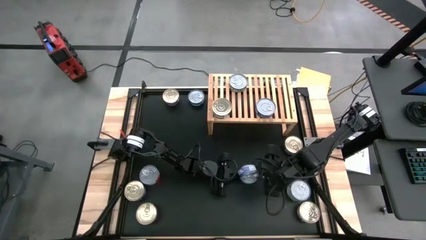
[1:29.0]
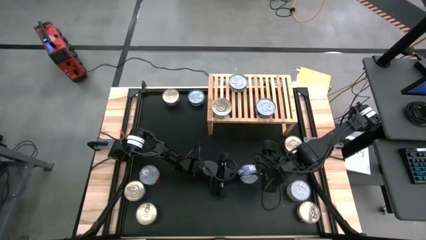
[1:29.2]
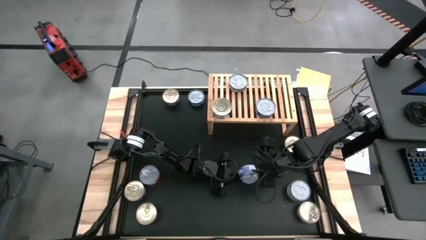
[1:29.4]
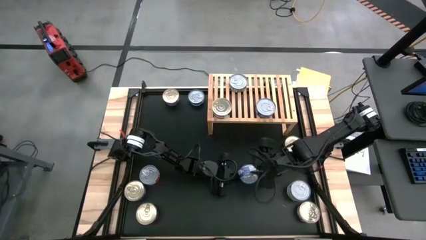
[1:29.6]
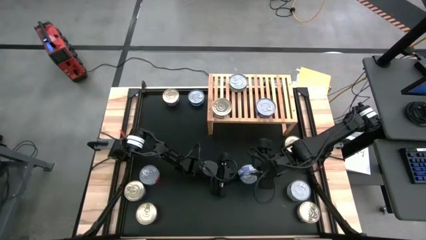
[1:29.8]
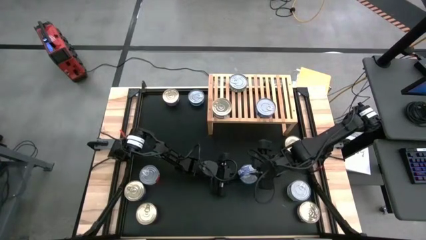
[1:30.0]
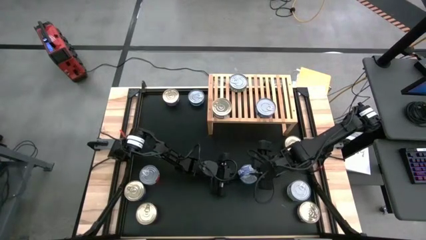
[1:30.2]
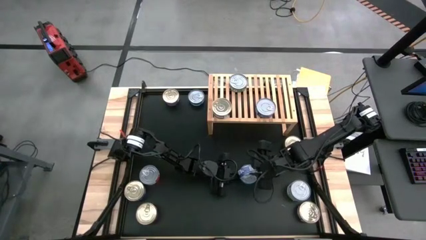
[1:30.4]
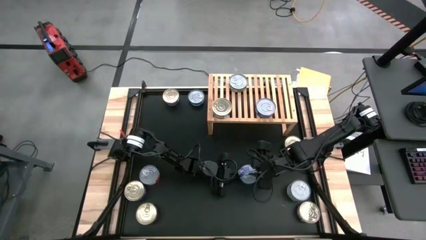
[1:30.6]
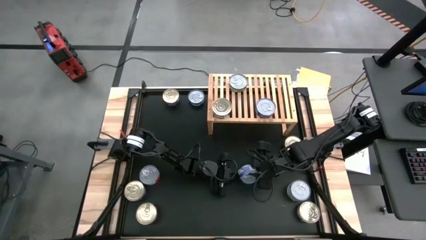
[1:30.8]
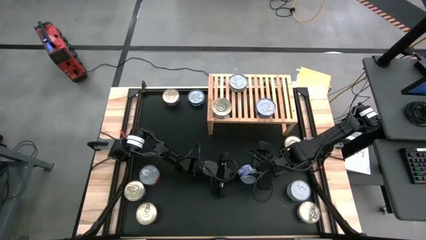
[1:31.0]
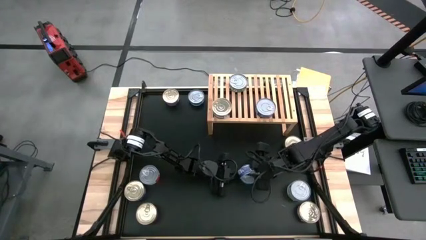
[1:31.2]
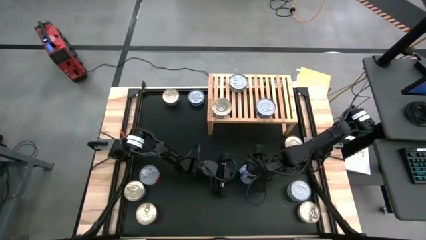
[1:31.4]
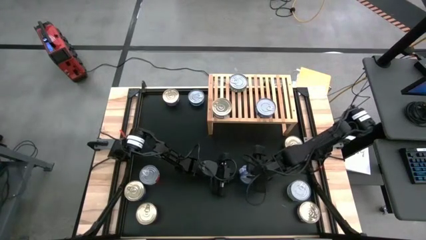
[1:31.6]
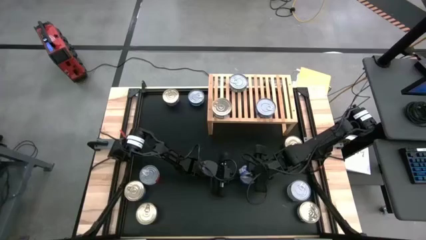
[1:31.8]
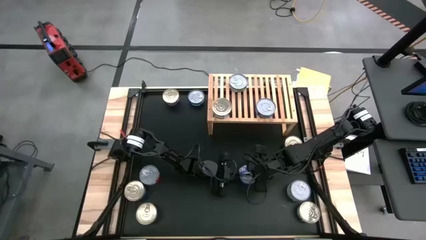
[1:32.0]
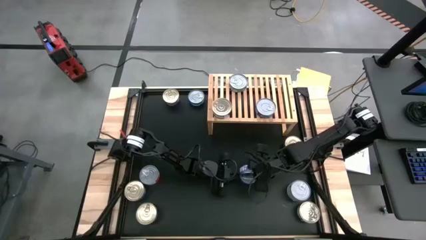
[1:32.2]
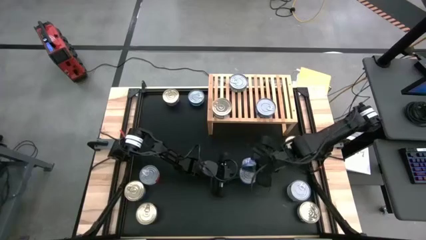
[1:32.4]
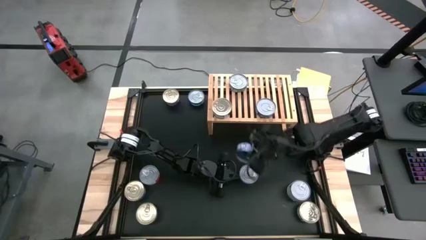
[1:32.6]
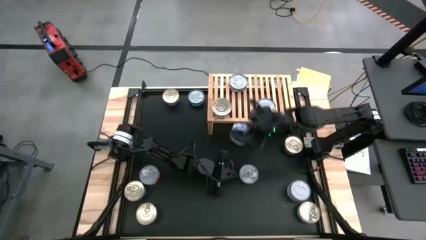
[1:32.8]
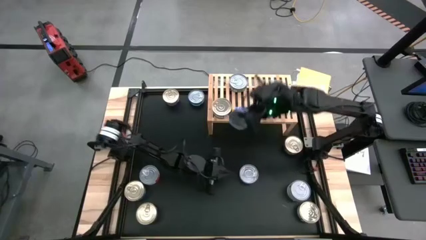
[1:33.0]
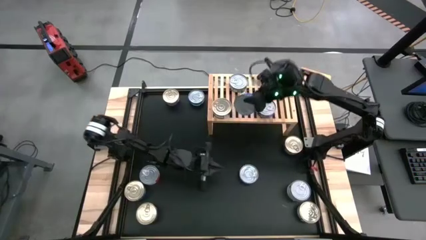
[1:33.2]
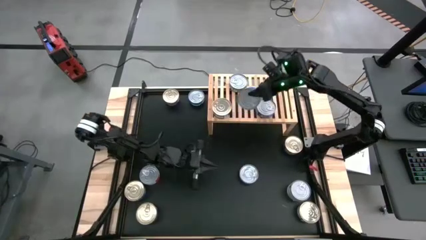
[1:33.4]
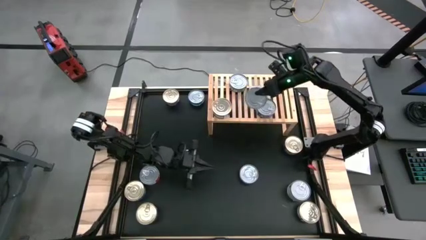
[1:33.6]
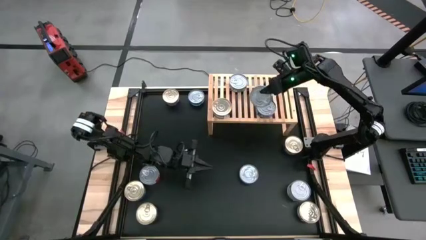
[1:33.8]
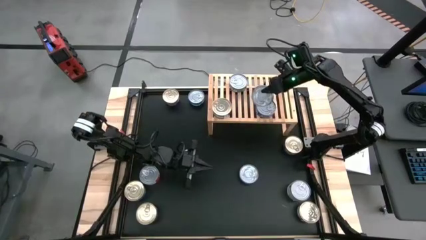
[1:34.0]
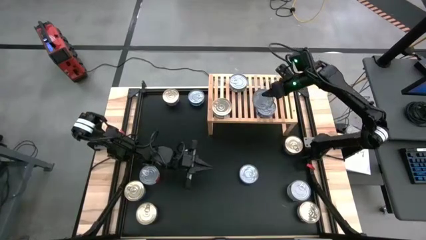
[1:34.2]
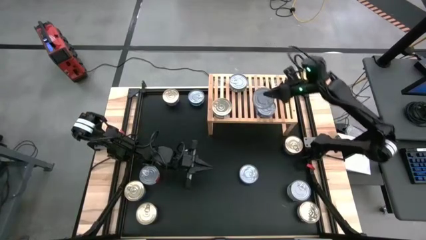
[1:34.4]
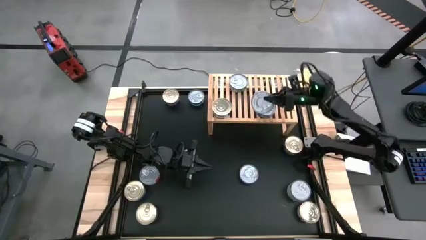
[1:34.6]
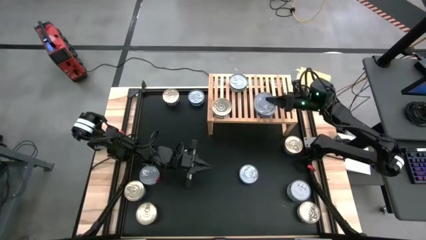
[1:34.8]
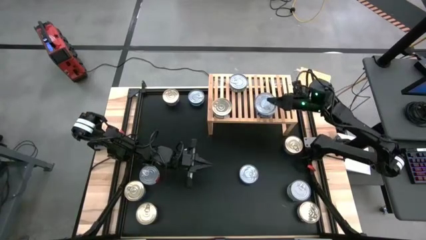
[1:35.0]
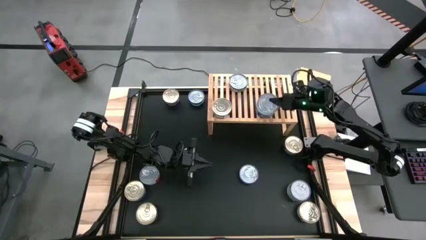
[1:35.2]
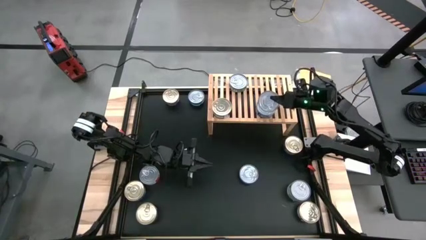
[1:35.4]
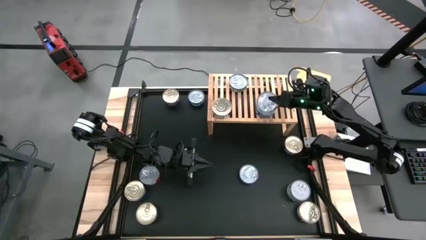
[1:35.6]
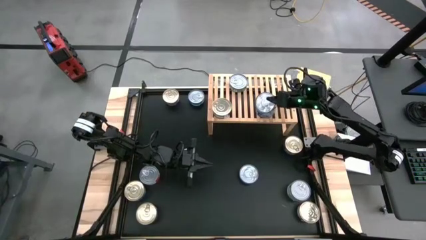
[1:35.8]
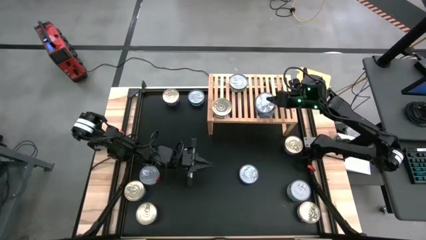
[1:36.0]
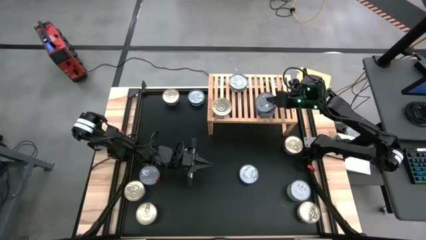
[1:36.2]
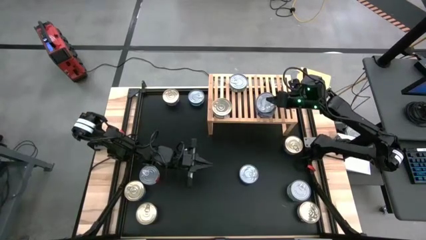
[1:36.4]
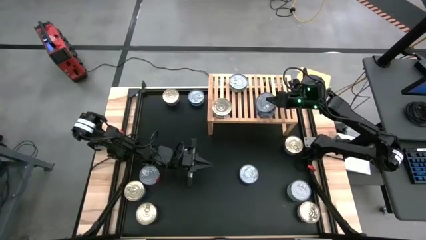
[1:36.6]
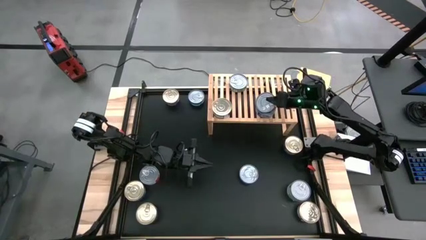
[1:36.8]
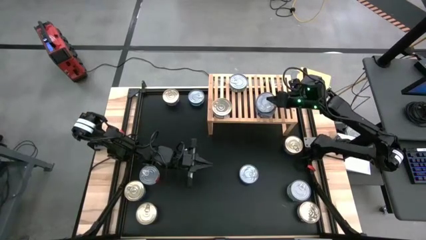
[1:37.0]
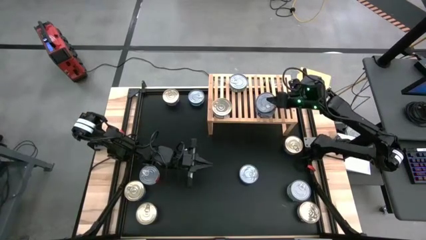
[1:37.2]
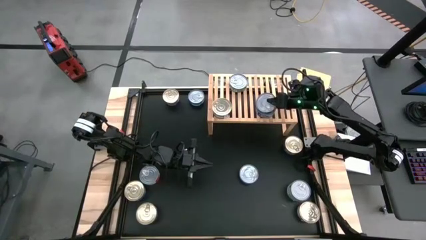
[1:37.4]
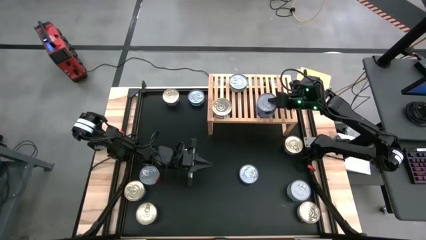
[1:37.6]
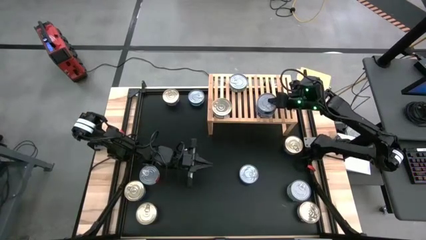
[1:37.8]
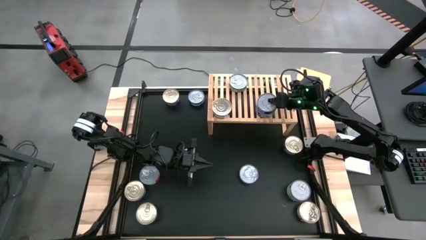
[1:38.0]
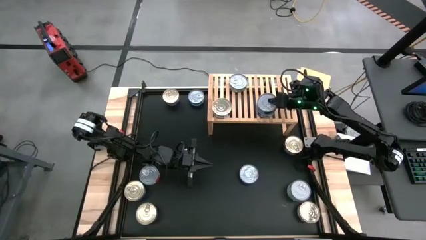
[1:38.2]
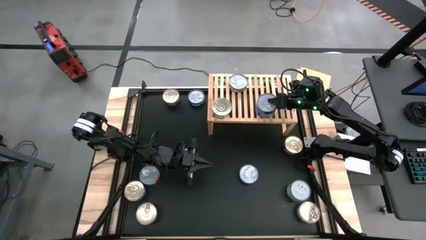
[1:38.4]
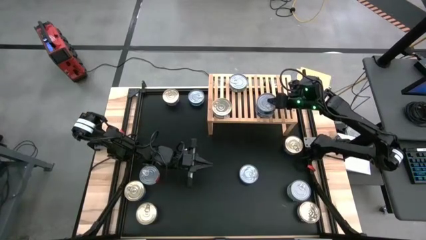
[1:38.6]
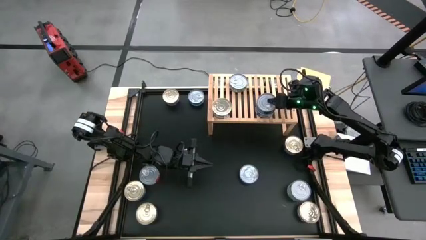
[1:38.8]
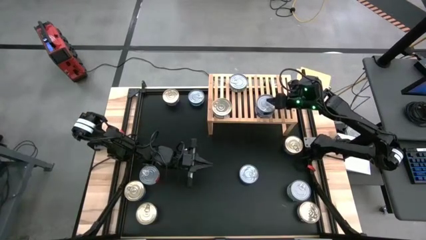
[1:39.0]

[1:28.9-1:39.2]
Task: Stack canned seafood by type on shelf
Stack the blue tuna can on top of the blue tuna can on the shelf
